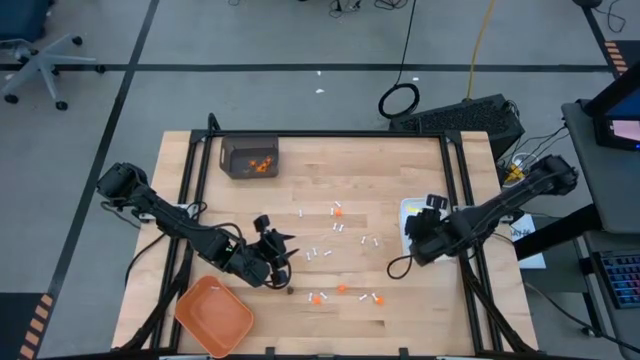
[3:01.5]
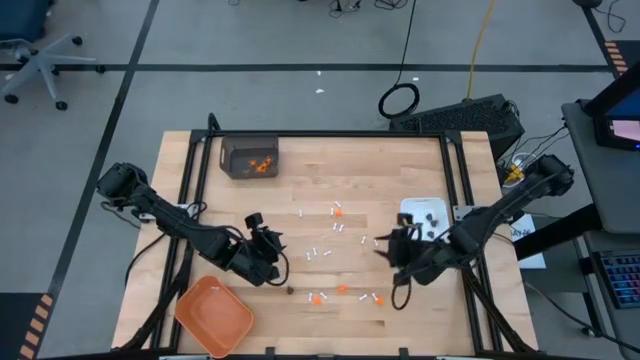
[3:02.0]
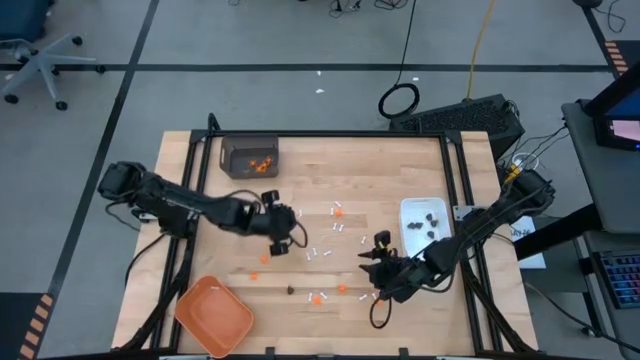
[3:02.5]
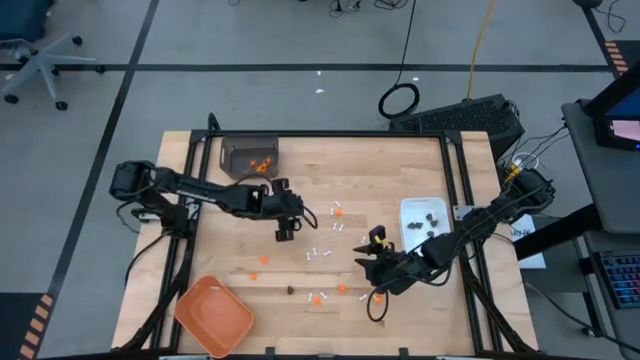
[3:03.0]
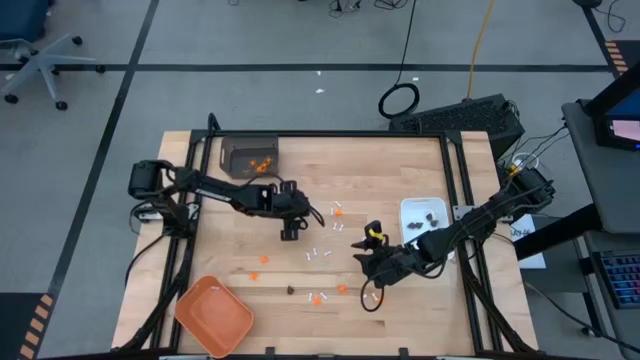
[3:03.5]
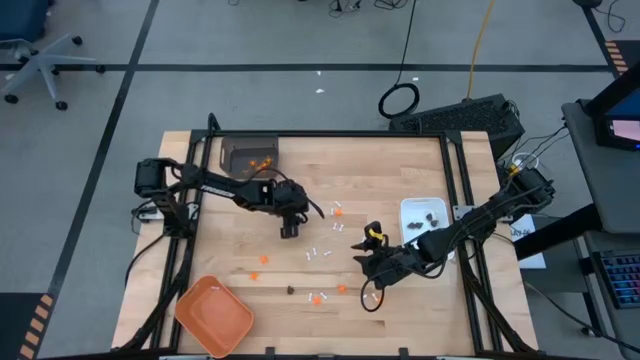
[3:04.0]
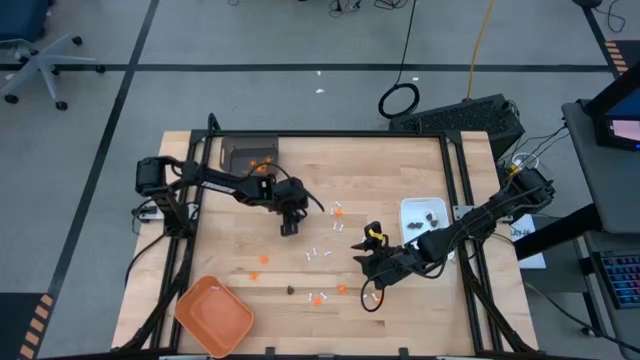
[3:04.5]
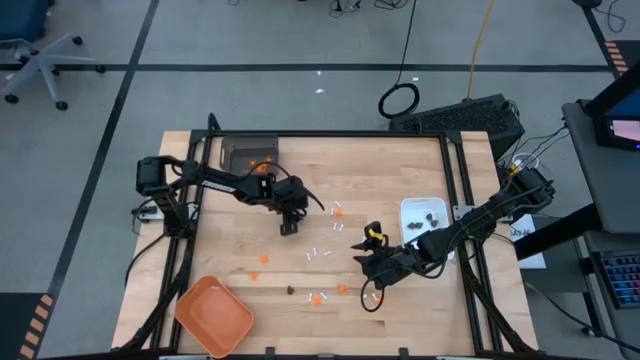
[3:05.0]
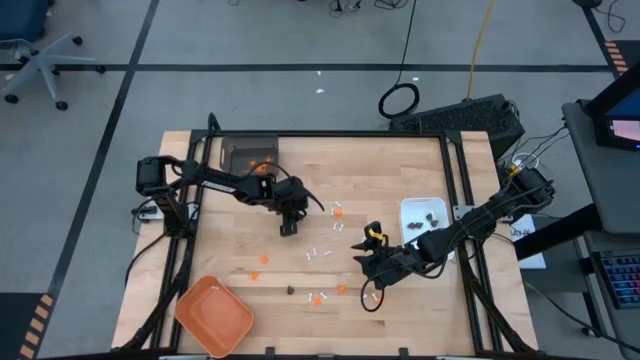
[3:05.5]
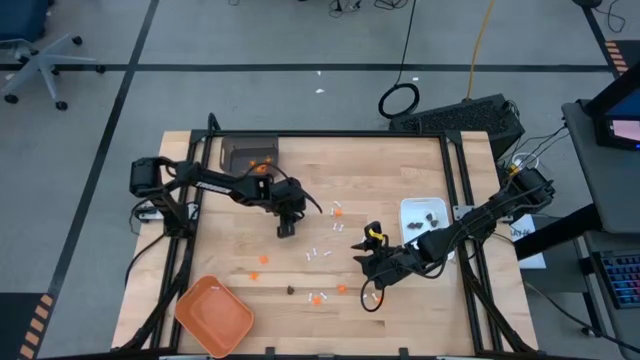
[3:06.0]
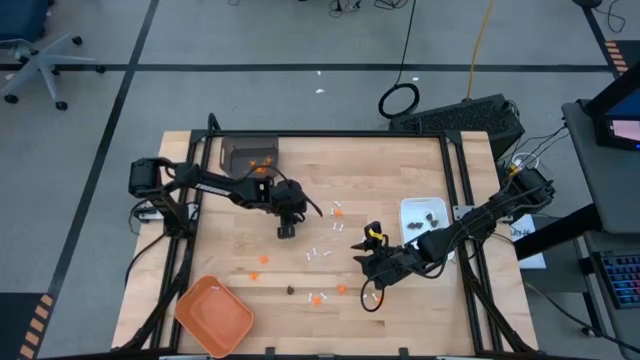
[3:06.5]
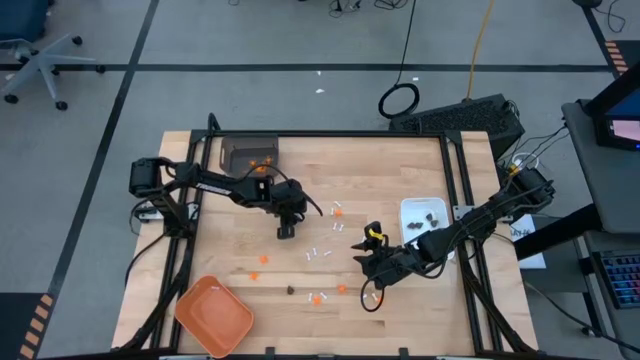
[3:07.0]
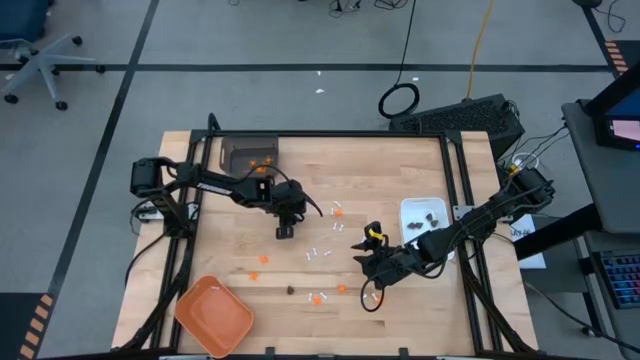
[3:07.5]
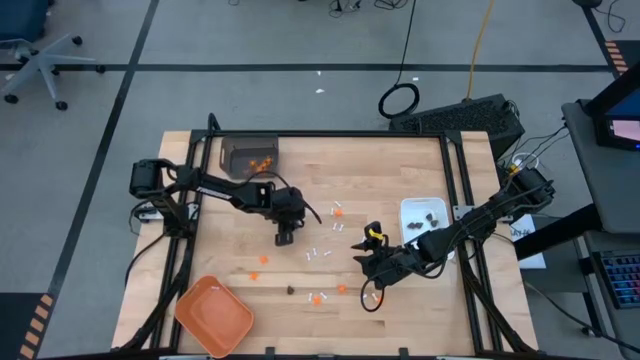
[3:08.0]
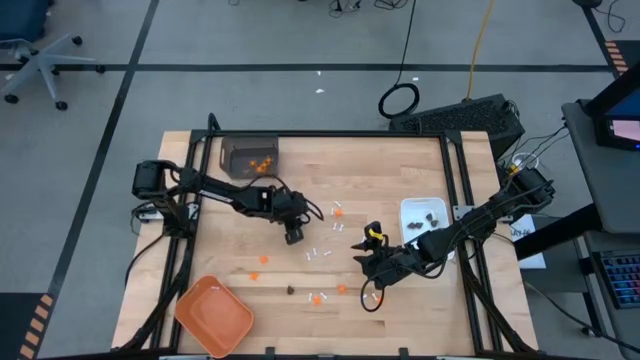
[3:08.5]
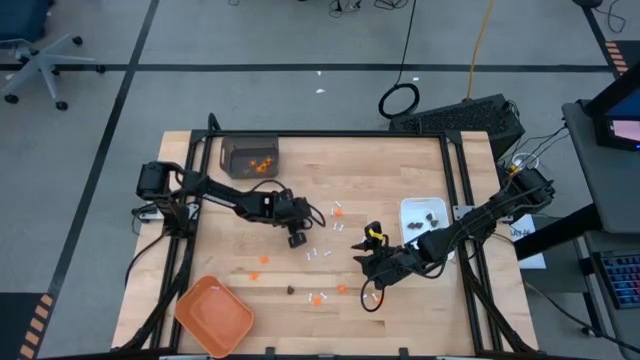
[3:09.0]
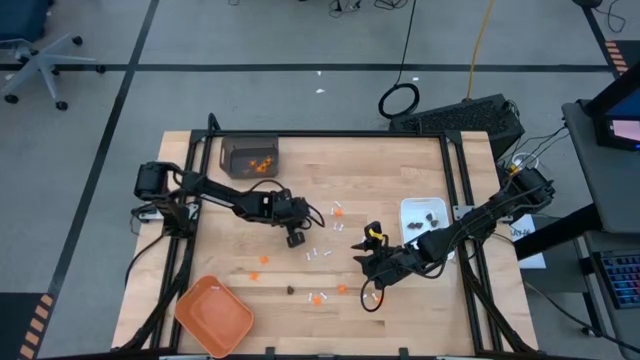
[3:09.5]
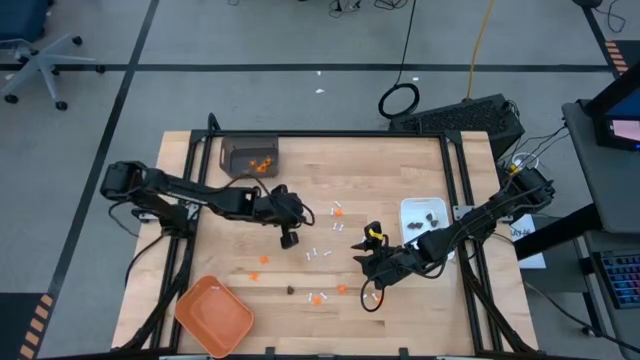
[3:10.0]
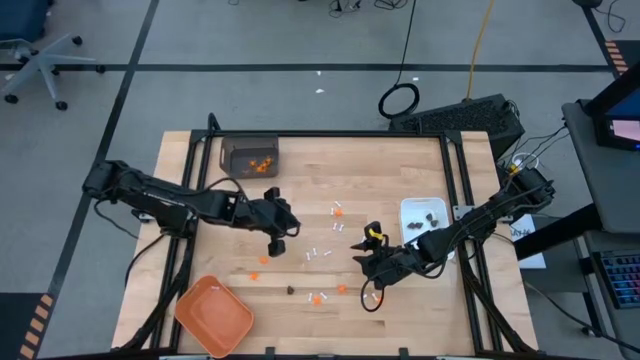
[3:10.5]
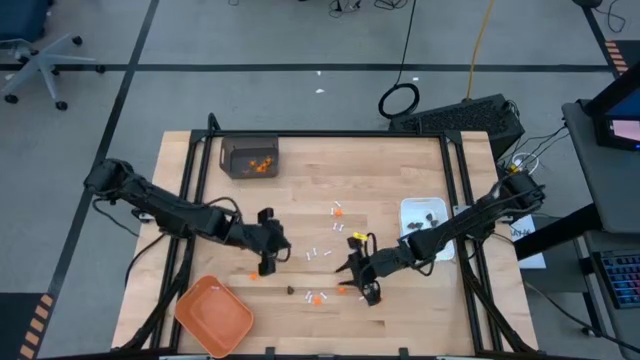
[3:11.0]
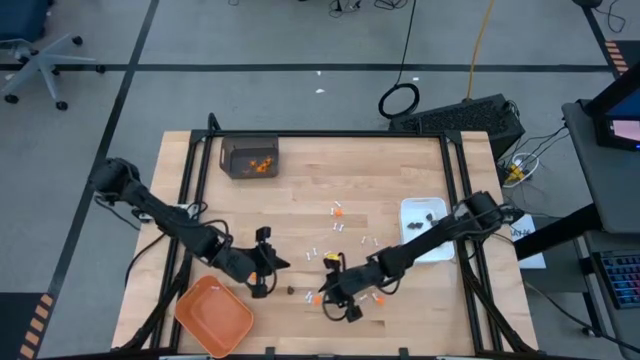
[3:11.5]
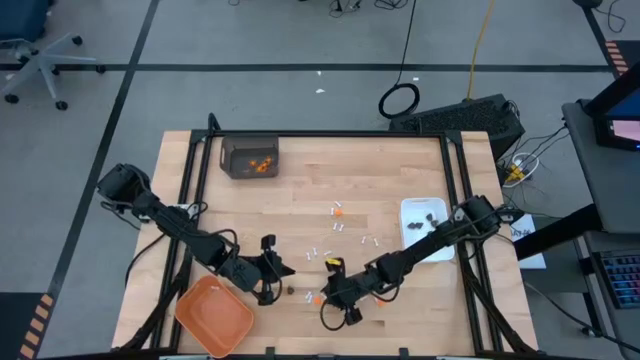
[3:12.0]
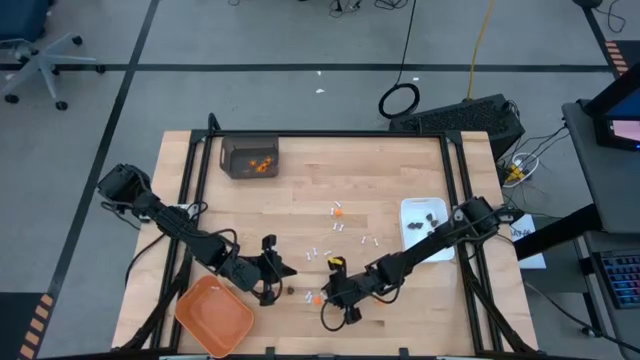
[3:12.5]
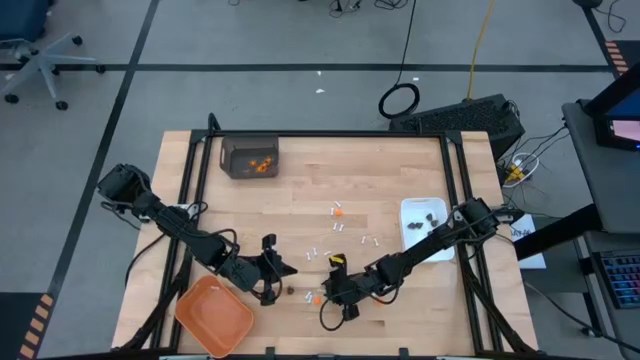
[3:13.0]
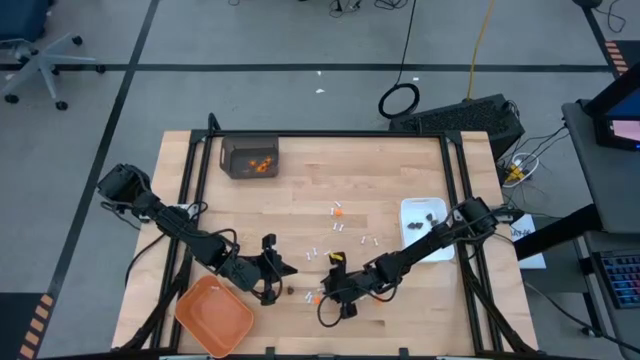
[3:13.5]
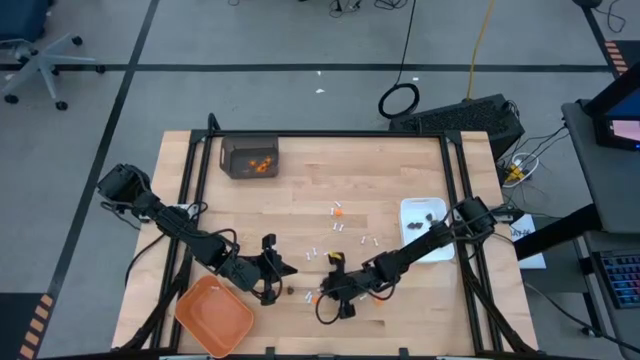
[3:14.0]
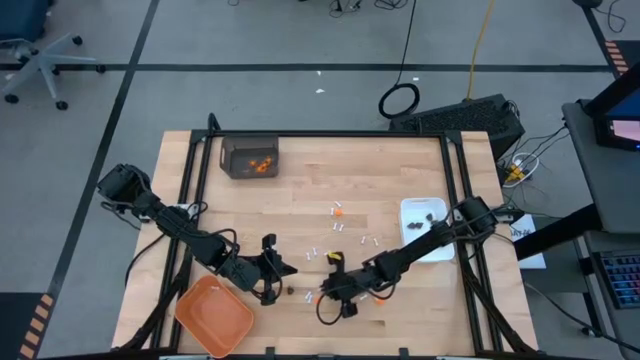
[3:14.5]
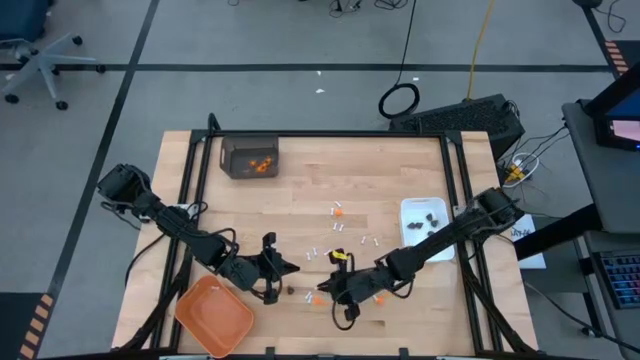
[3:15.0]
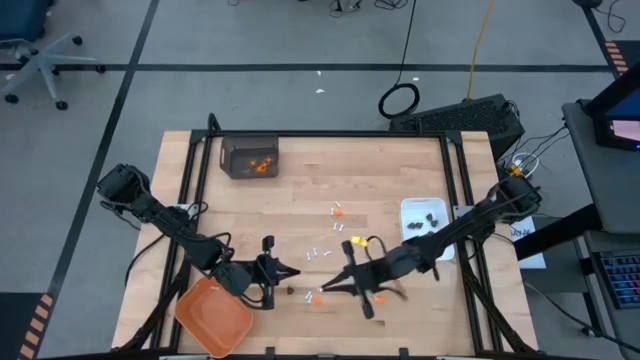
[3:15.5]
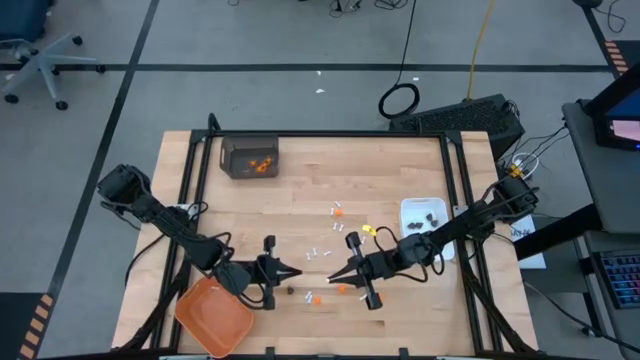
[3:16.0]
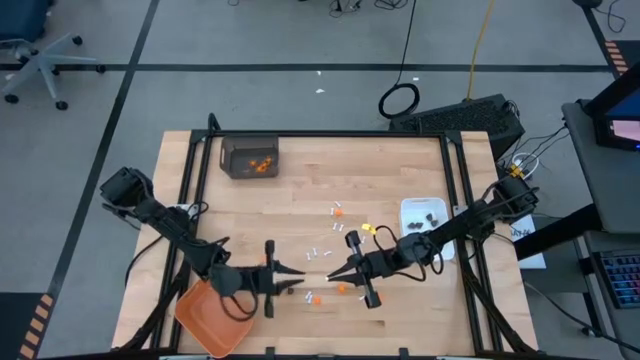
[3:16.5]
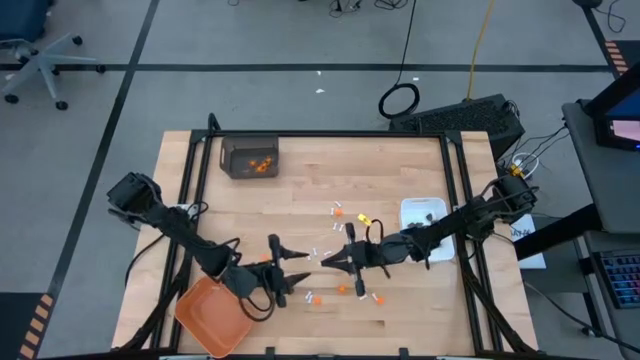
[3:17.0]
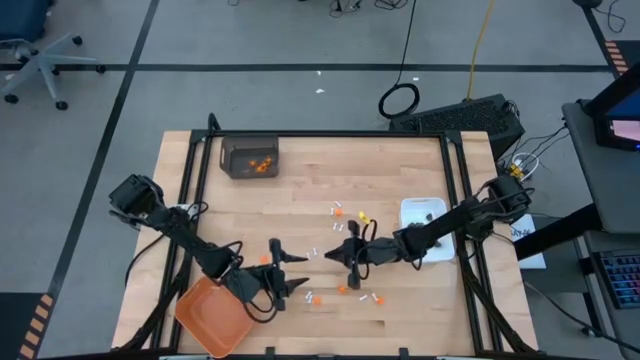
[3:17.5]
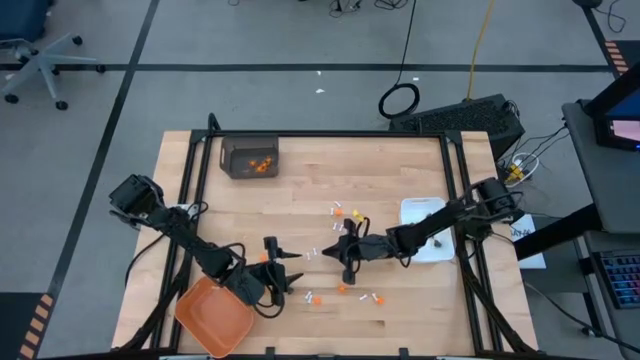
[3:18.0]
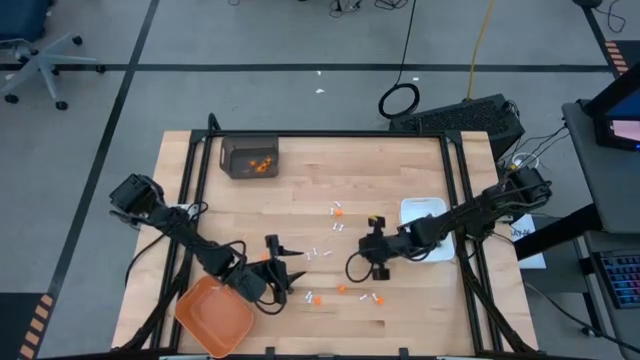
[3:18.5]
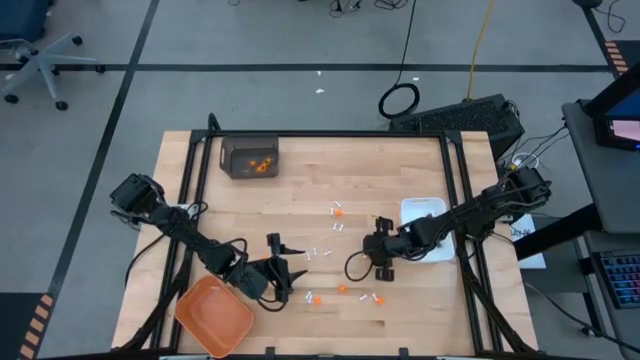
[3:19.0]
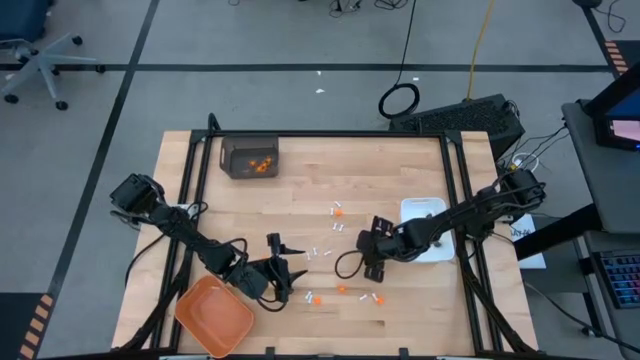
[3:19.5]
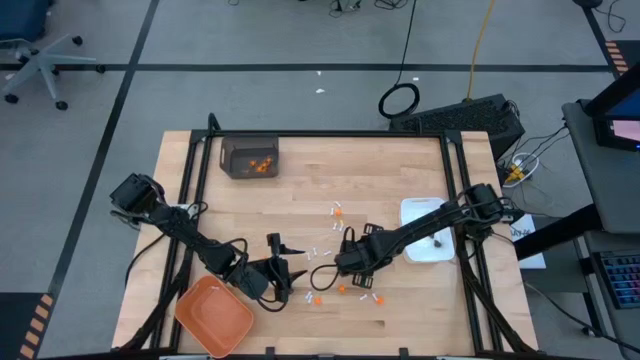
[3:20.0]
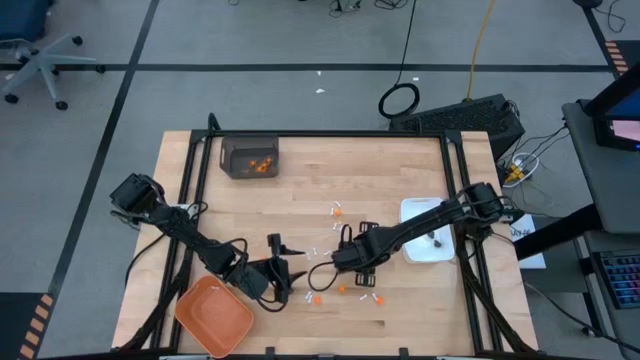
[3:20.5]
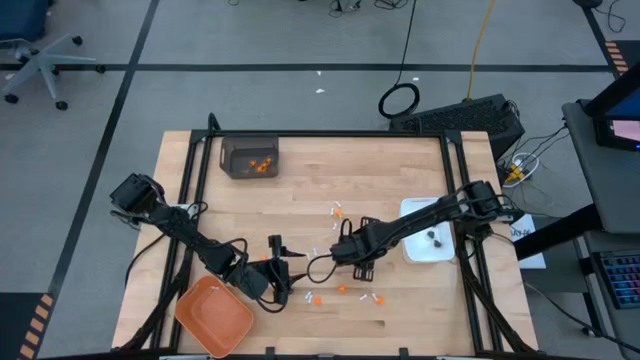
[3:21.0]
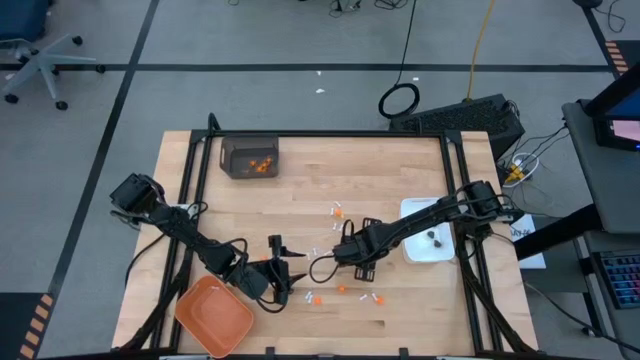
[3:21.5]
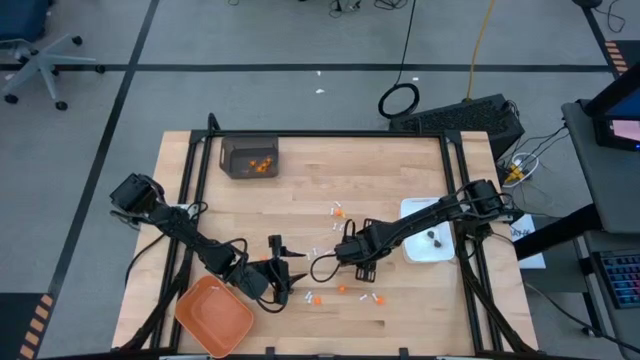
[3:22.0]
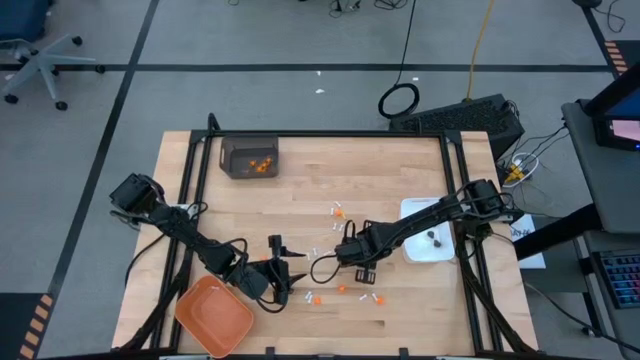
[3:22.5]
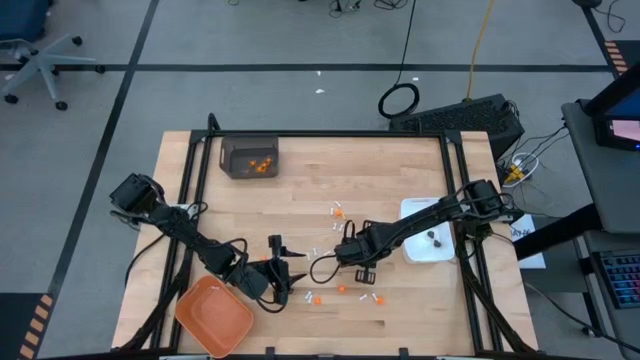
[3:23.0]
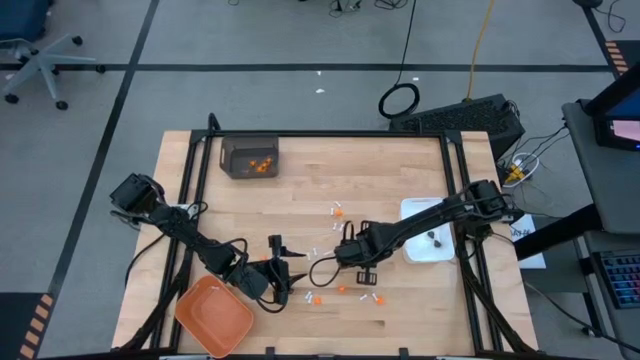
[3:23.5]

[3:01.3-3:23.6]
Task: Sort Halloween decoration
Put the white bone toy into the orange bin
